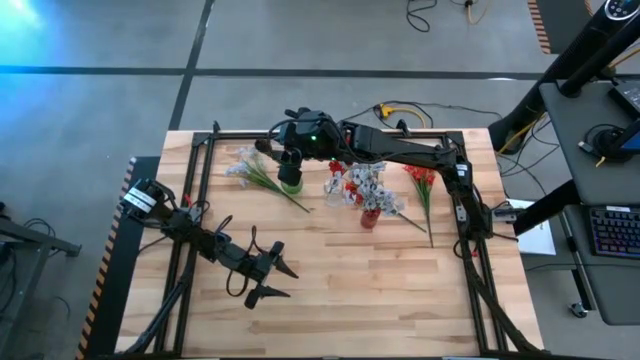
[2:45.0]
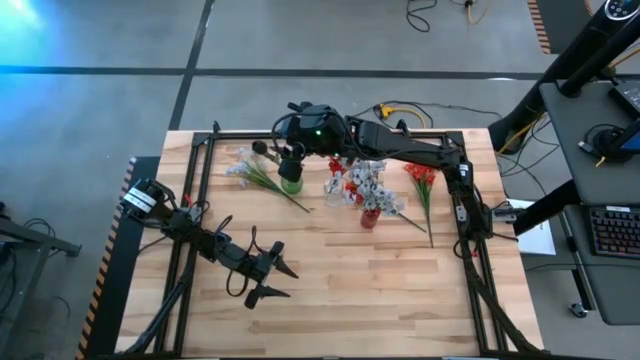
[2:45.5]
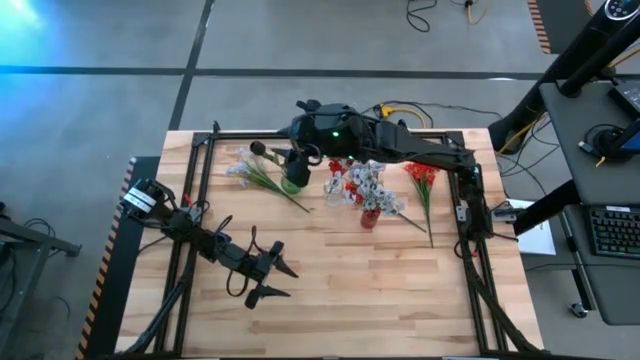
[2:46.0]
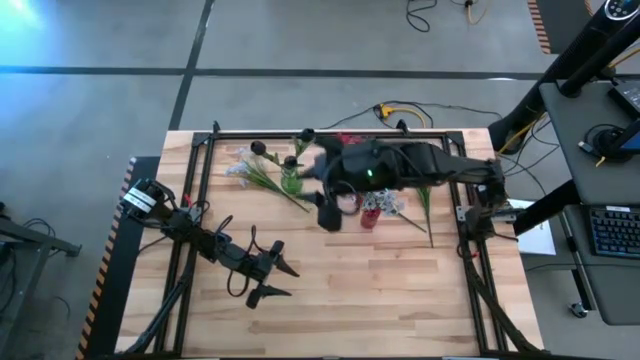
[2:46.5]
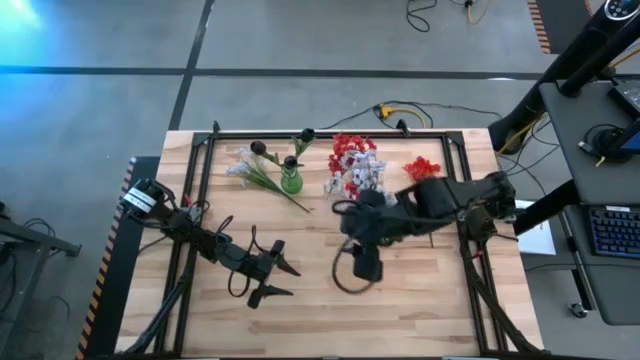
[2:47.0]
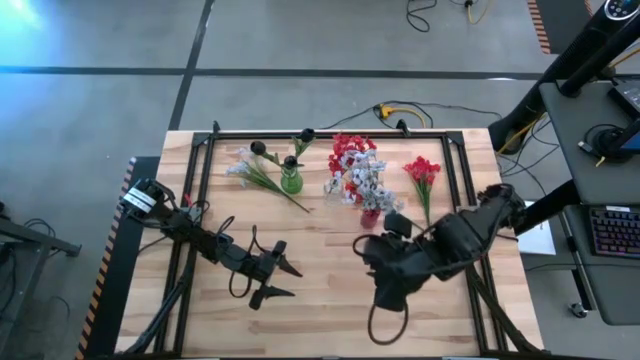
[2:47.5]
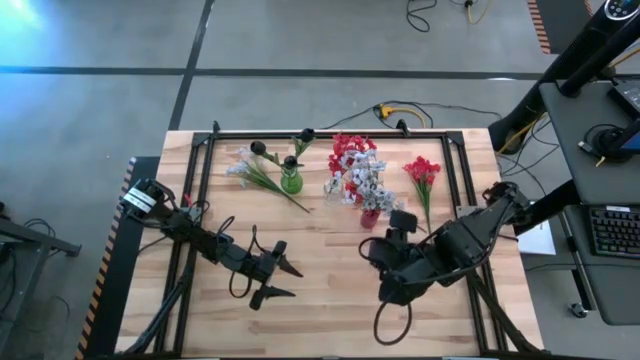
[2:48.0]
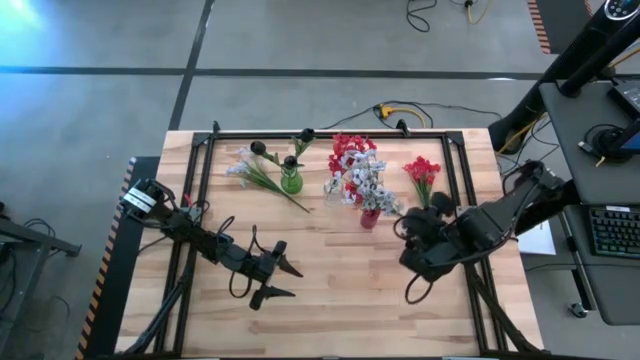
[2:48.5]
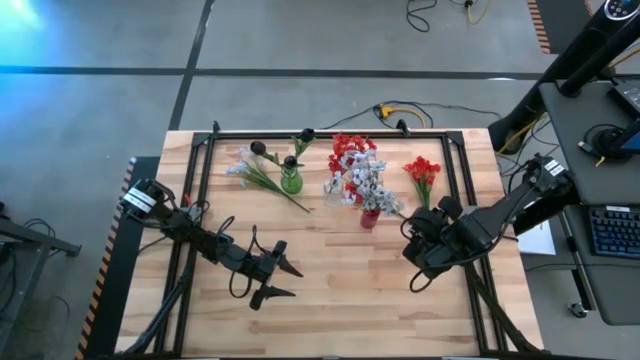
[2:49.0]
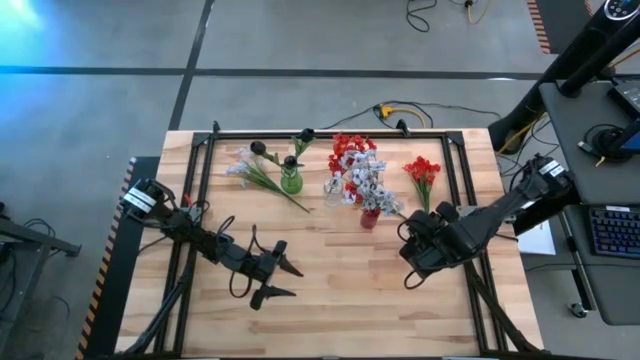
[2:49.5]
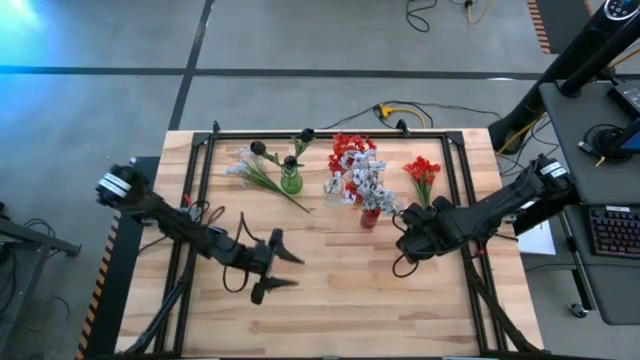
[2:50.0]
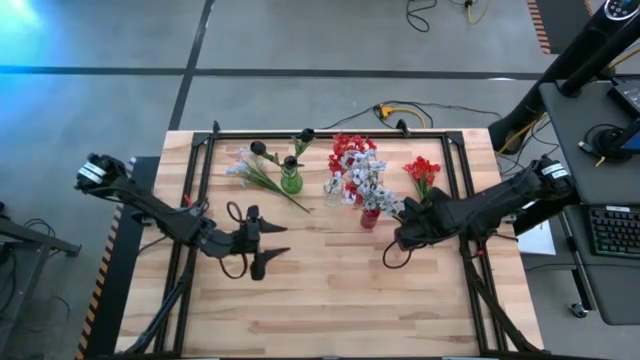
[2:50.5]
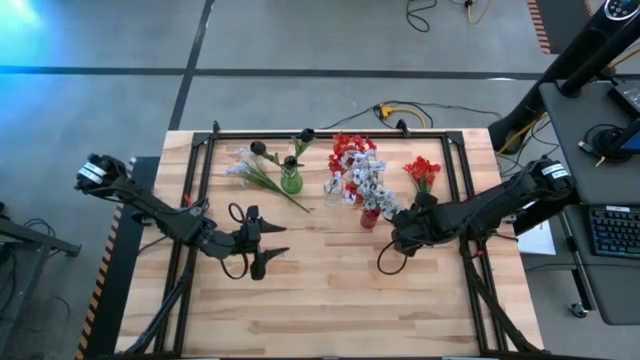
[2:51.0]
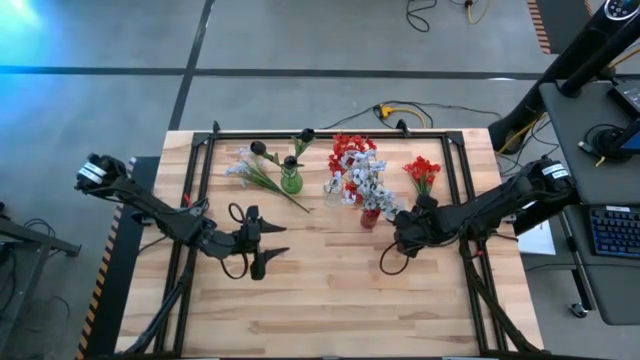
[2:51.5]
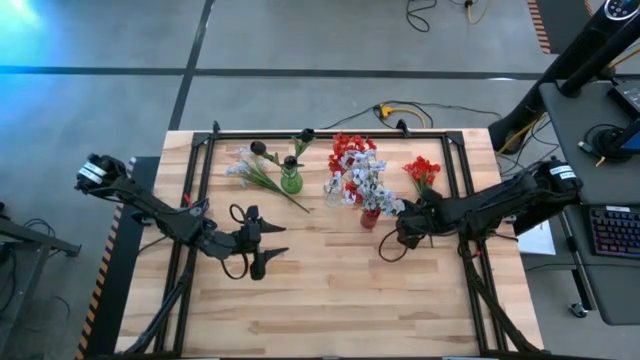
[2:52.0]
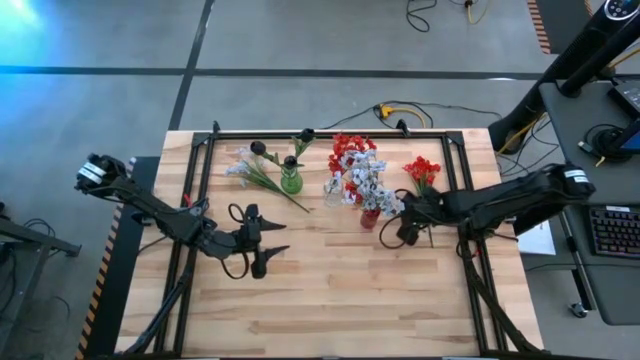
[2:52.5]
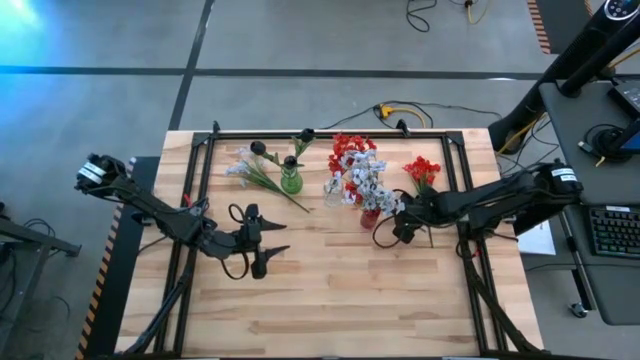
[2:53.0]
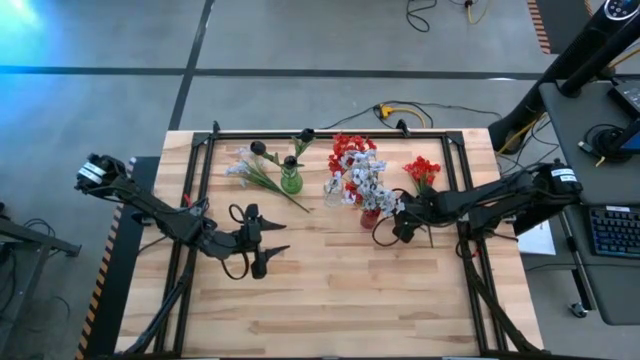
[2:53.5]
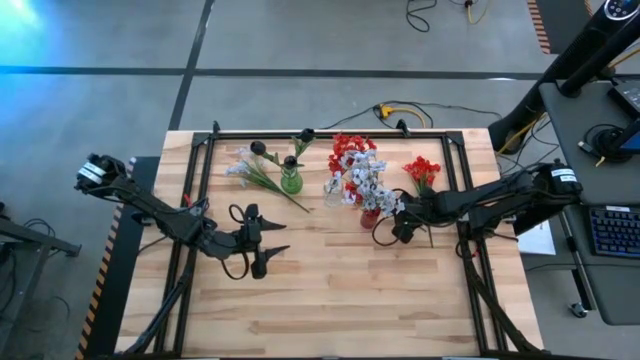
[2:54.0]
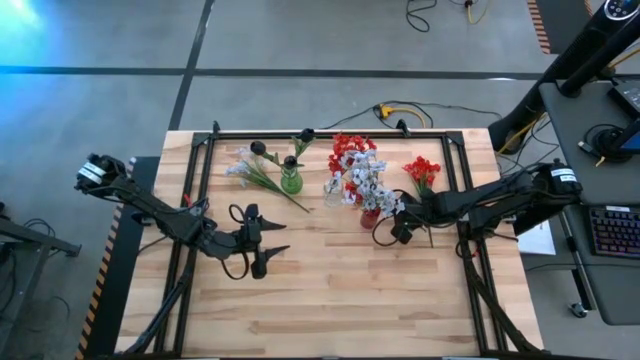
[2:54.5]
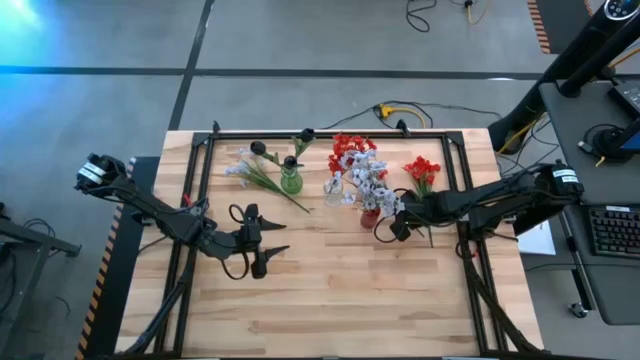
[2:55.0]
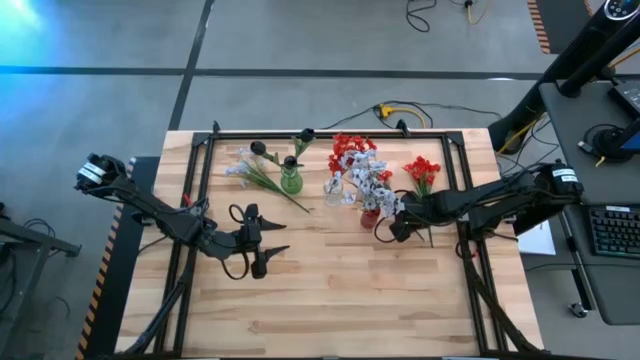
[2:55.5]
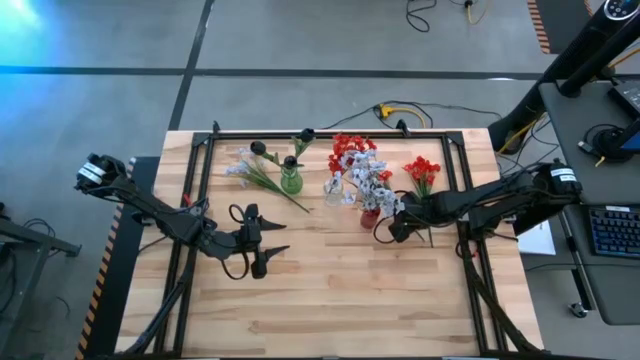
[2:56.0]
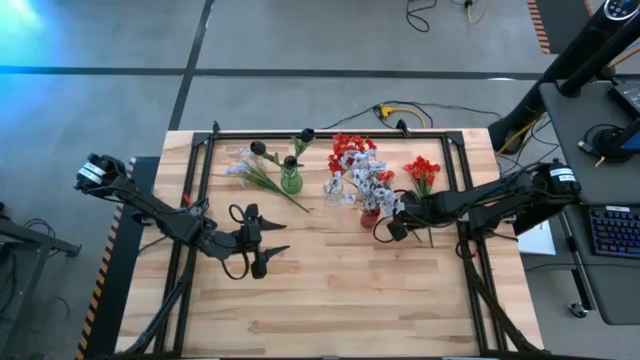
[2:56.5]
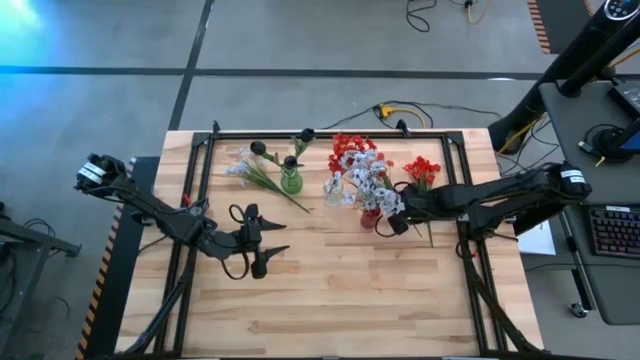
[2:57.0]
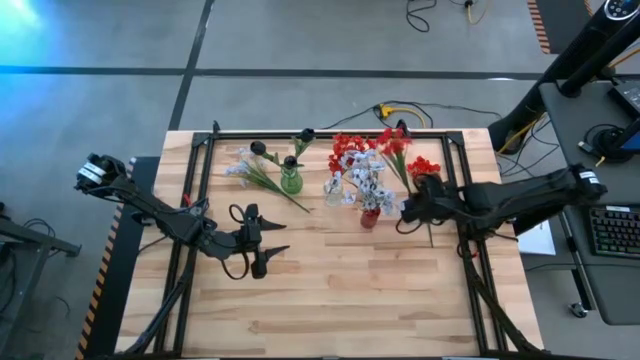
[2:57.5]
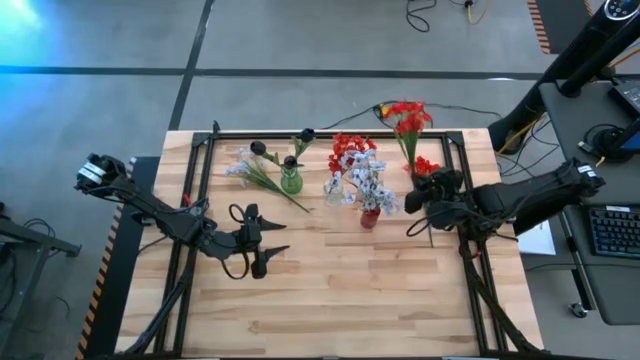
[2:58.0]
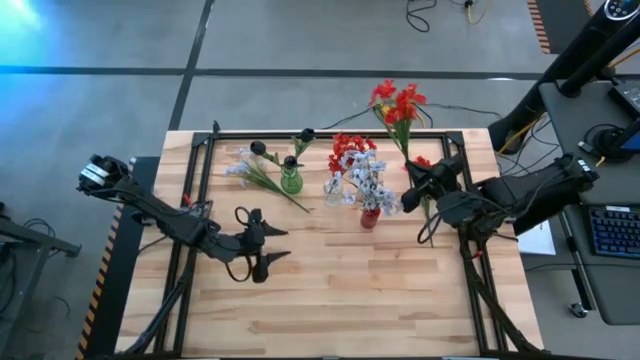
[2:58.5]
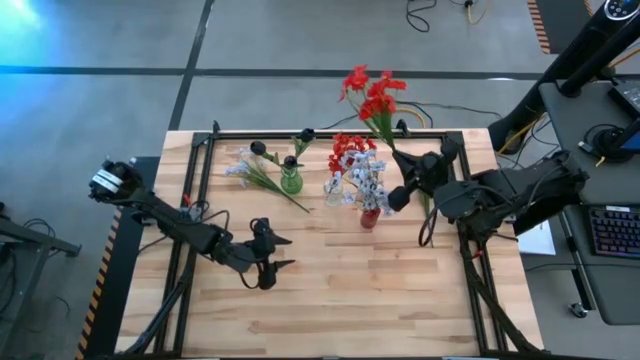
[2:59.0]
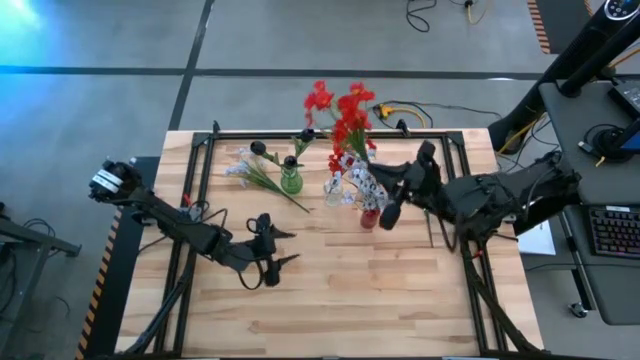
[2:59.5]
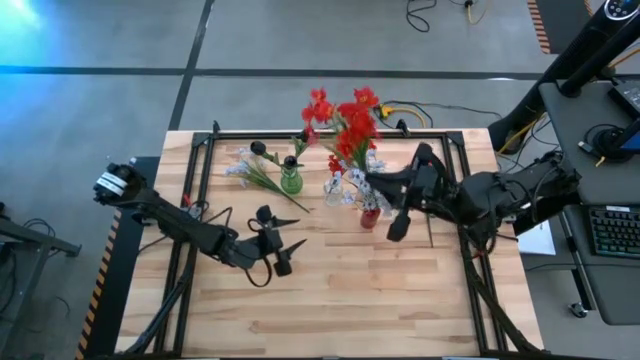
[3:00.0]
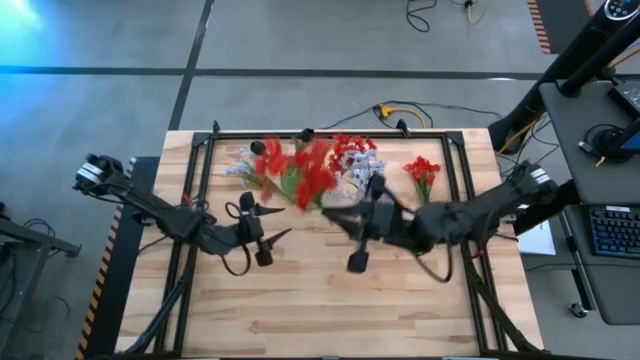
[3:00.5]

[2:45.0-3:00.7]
Task: Sort flowers into vase by color
Put the left orange flowers into the vase

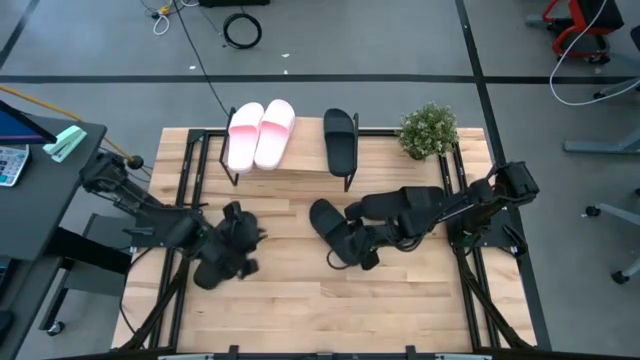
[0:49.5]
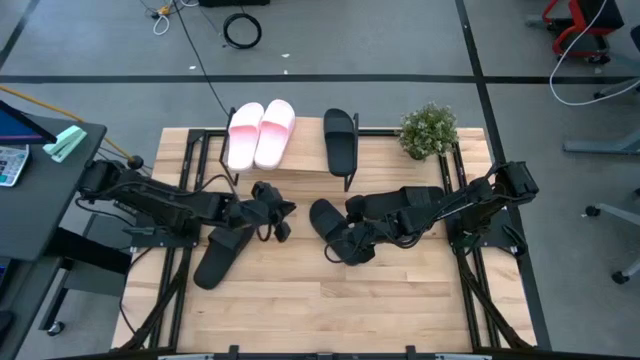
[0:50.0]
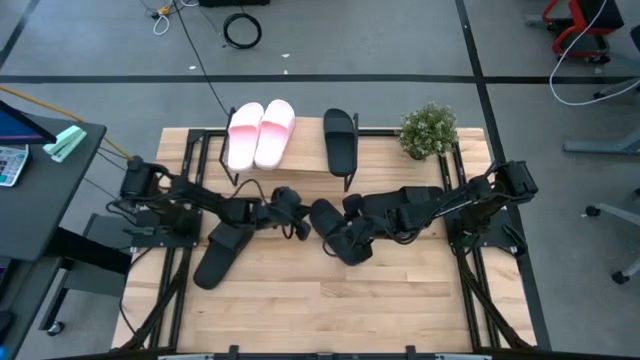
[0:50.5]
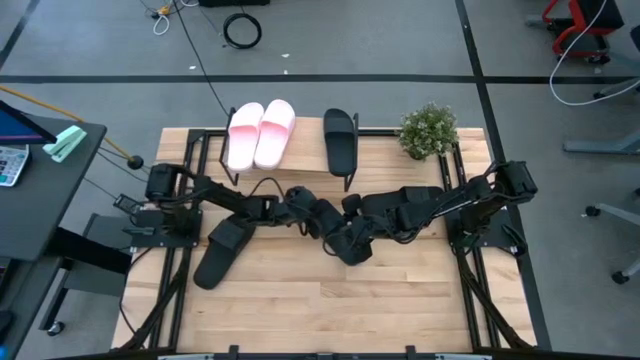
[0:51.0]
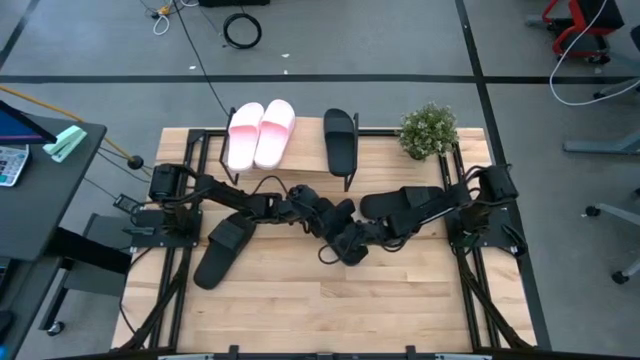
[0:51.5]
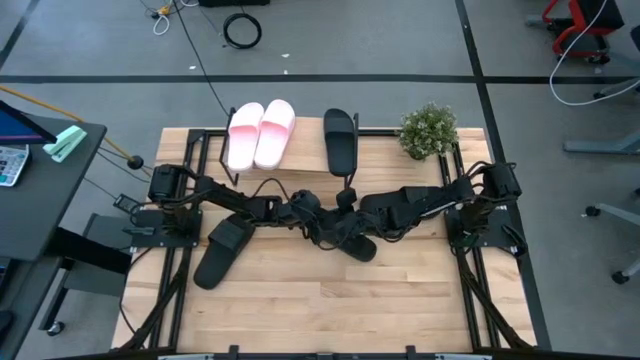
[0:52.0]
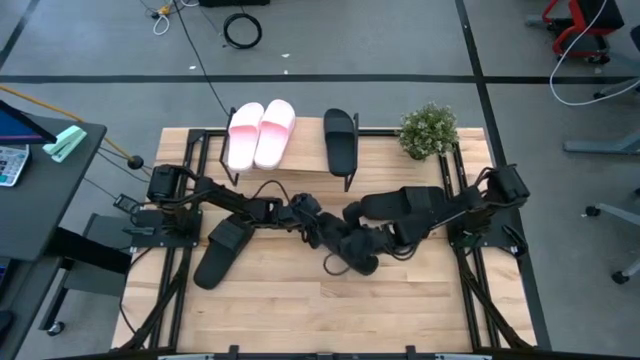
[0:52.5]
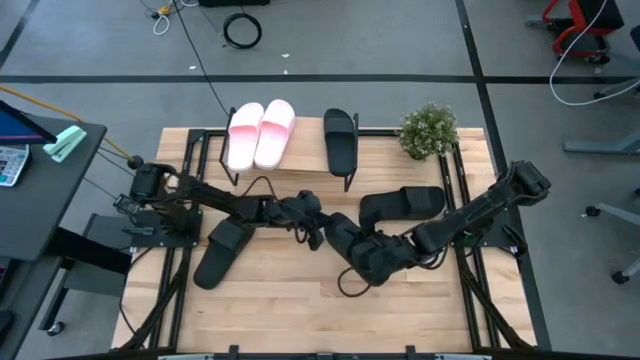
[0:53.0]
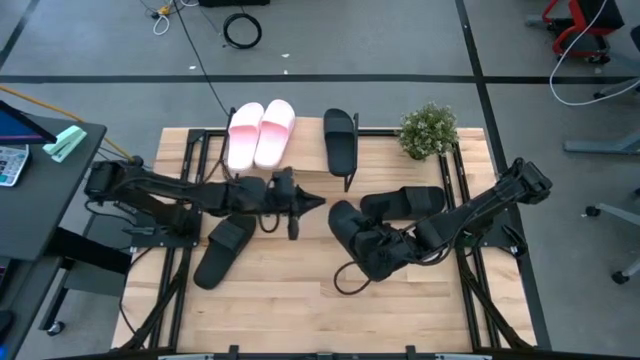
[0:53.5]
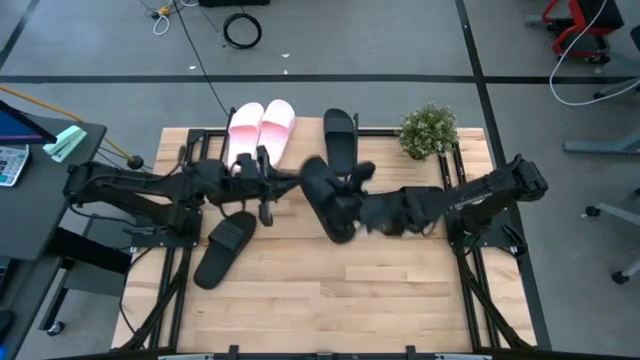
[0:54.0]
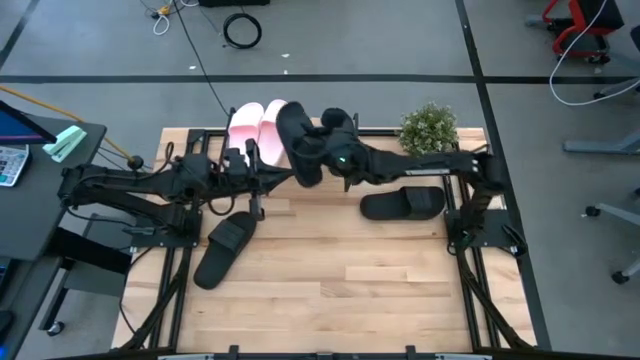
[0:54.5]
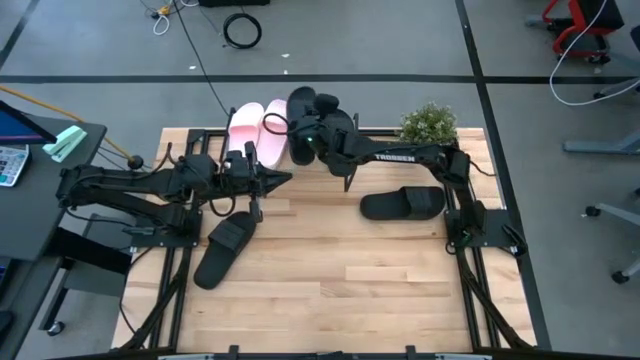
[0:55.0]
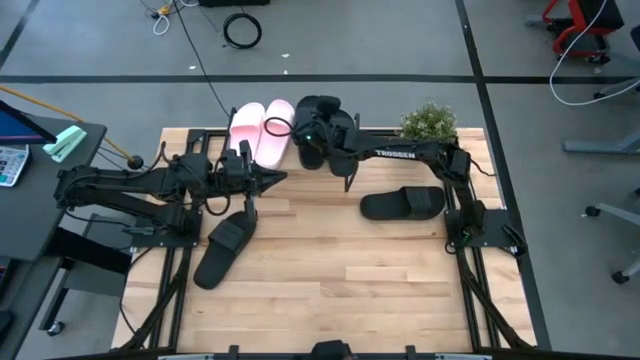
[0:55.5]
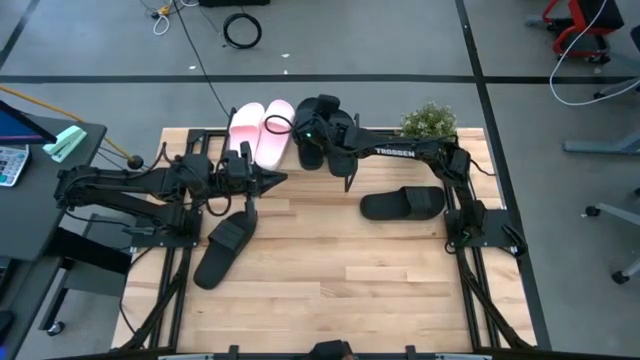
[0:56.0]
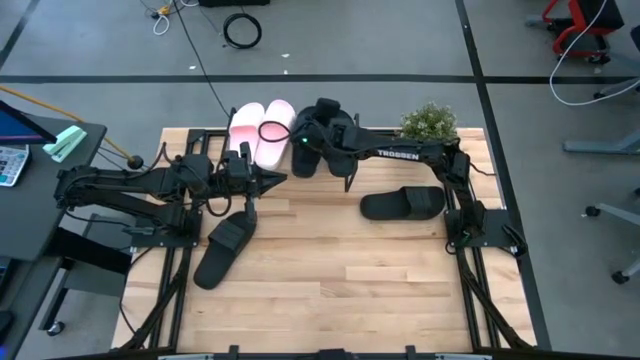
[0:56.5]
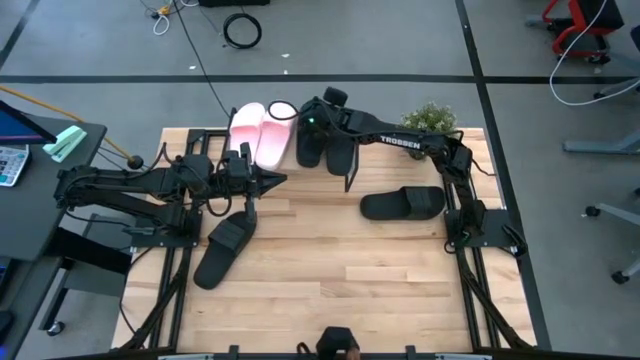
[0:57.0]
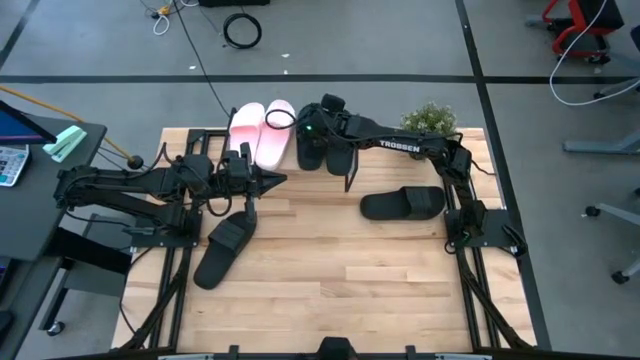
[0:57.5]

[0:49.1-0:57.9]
Task: Pick and place slides into the shelf
Put the black slide on the shelf
